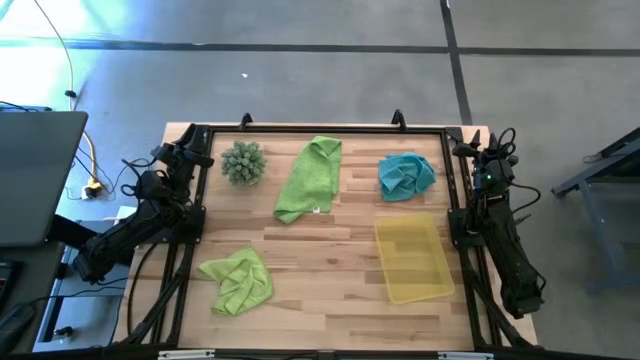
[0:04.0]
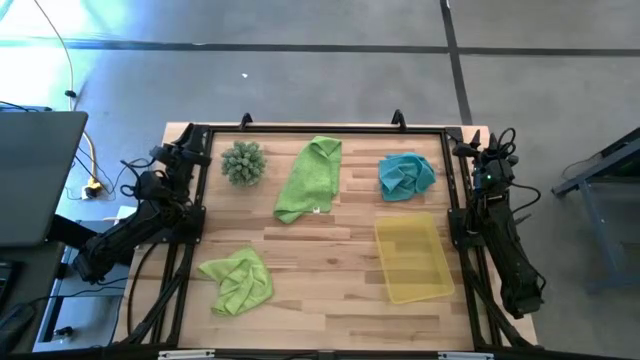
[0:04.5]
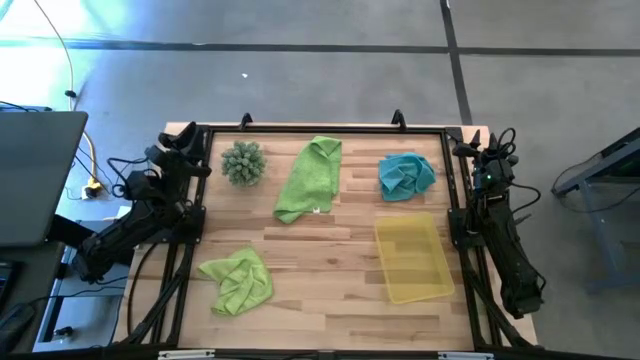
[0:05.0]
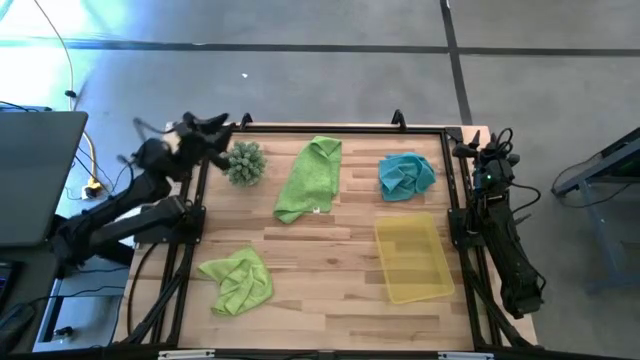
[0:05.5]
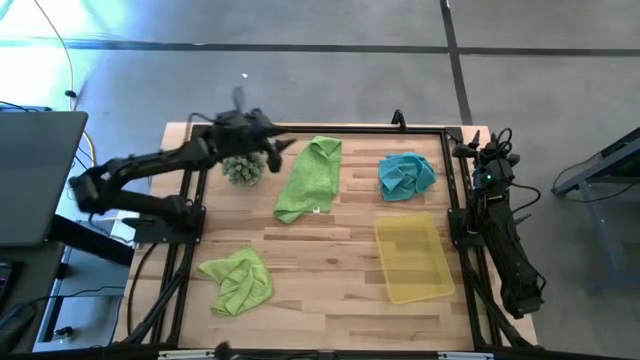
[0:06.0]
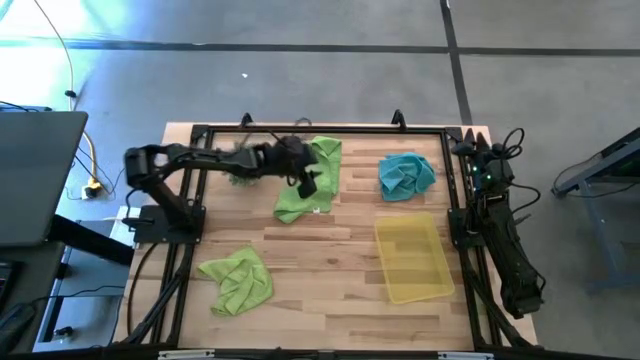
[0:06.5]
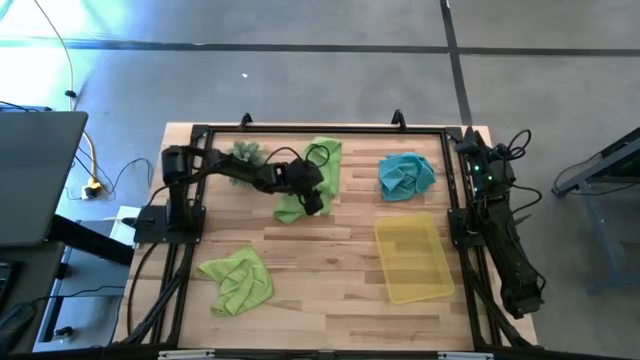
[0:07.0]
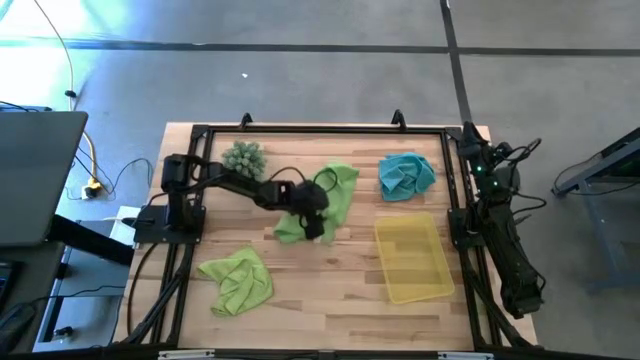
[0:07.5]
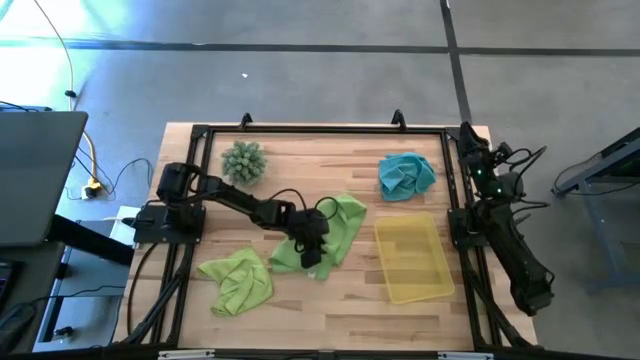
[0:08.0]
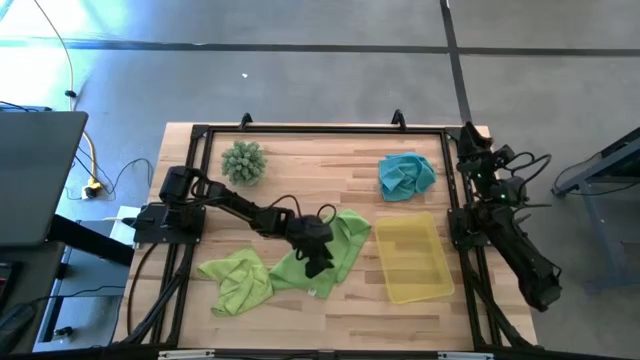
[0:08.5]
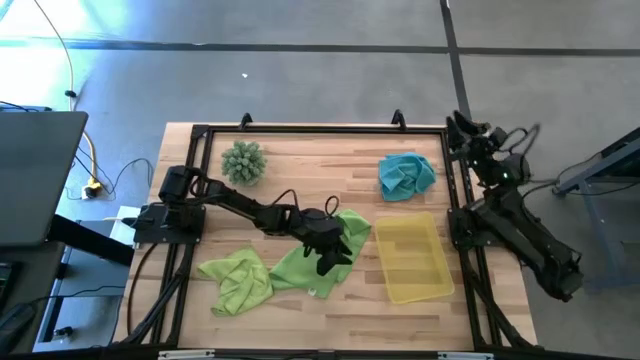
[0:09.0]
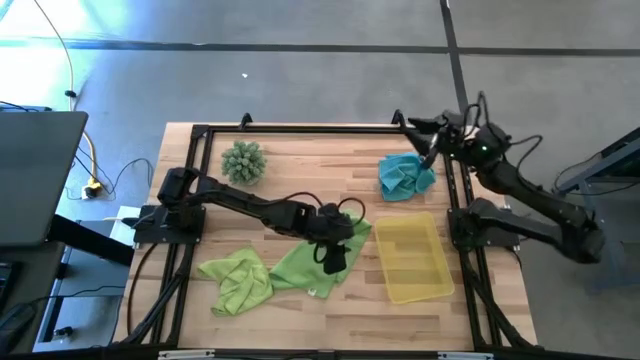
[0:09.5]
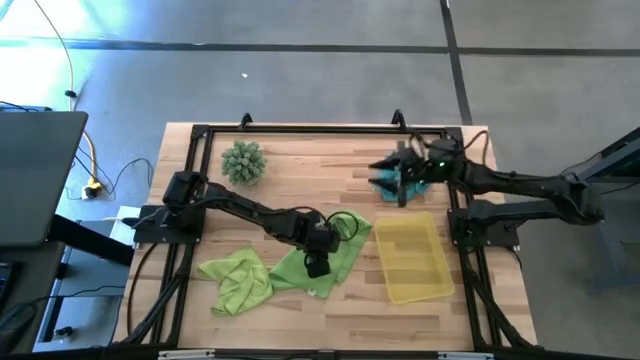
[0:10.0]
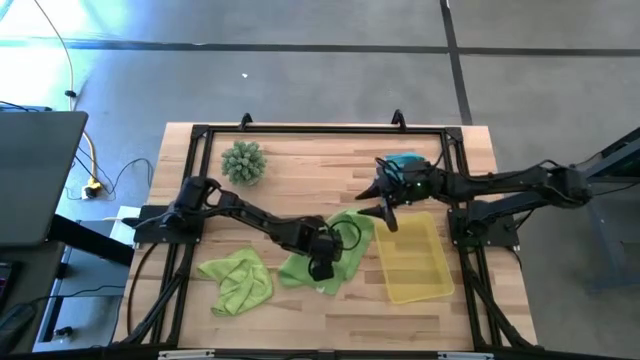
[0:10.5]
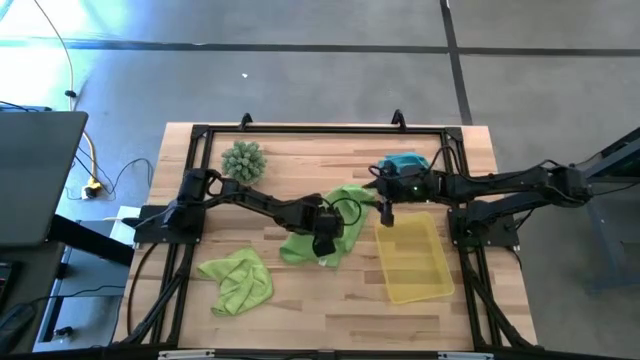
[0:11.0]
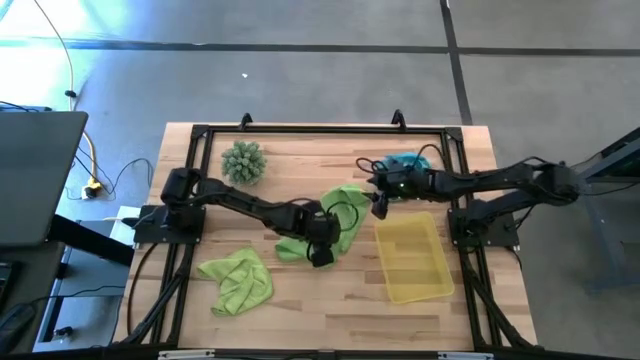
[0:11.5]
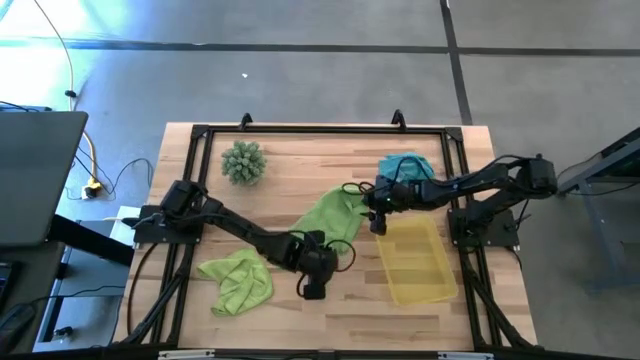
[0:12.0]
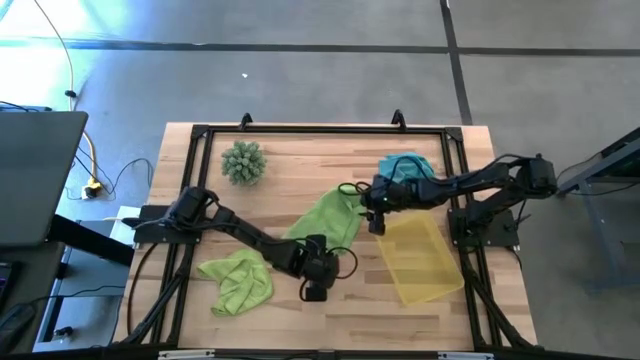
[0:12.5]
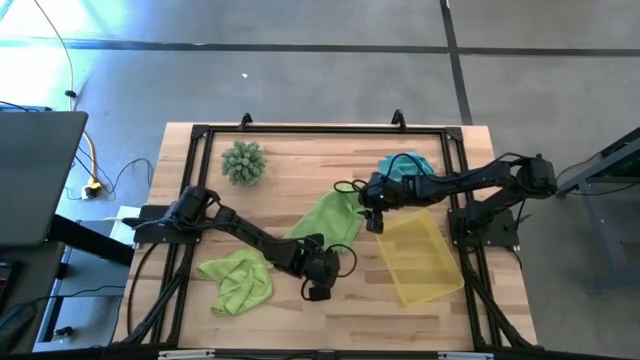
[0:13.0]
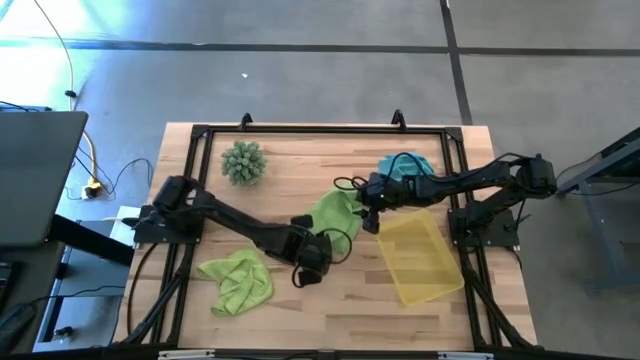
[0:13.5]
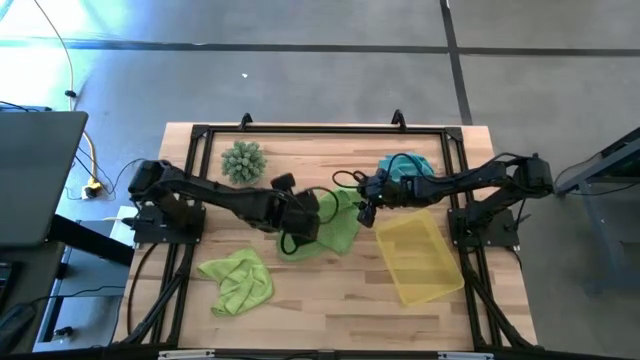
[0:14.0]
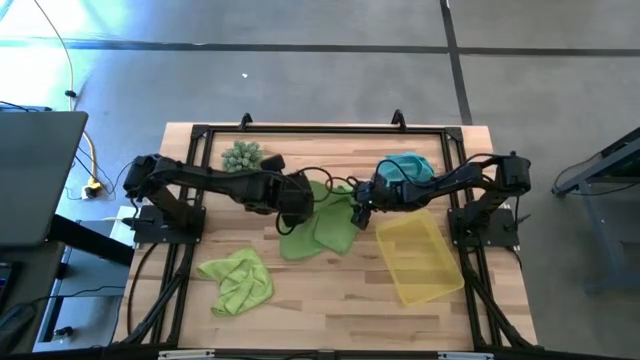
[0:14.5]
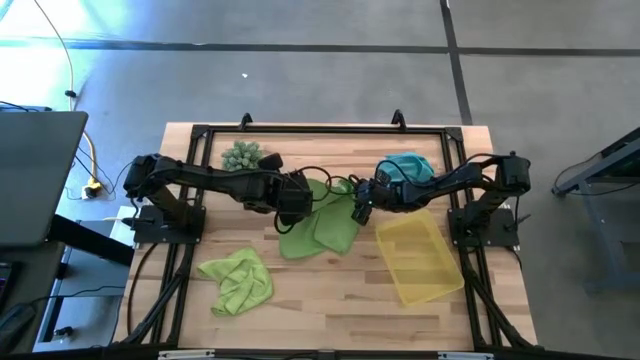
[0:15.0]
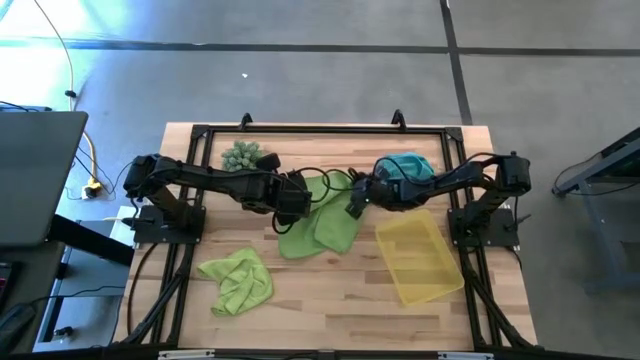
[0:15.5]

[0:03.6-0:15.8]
Task: Roll microfiber towels into tight, uniform cylinder then place into a basket
Fold the green cloth

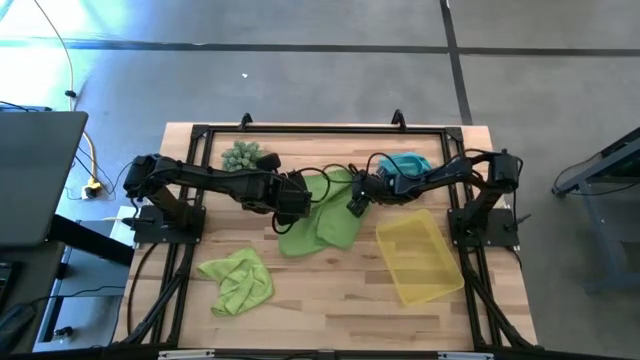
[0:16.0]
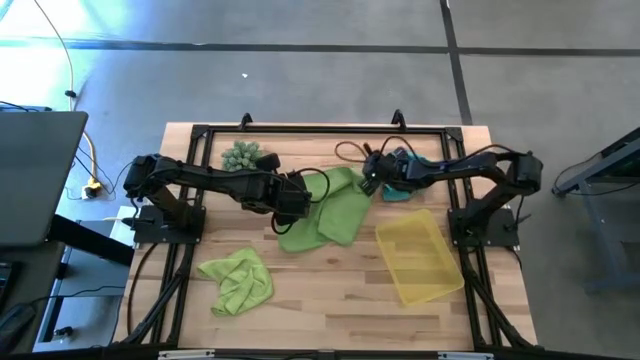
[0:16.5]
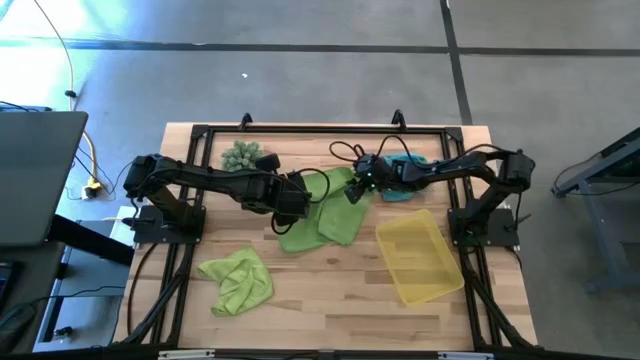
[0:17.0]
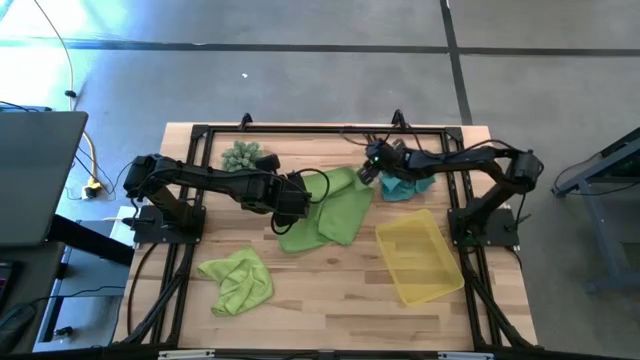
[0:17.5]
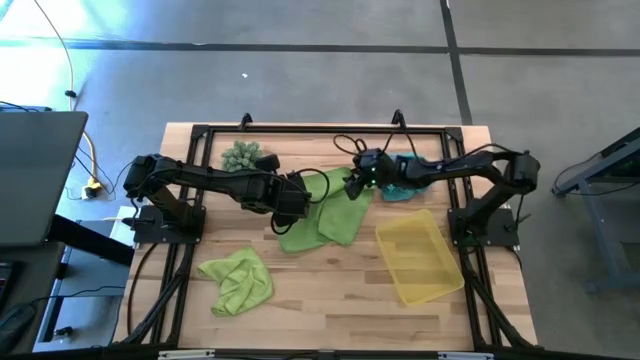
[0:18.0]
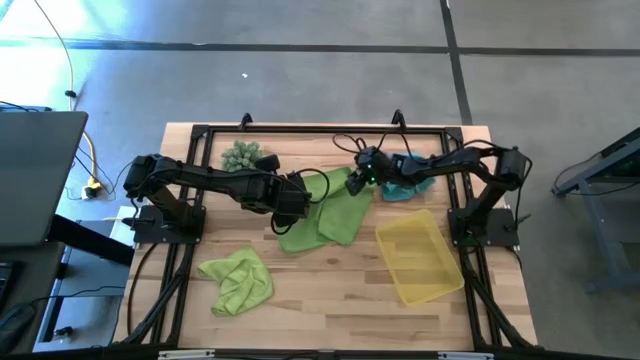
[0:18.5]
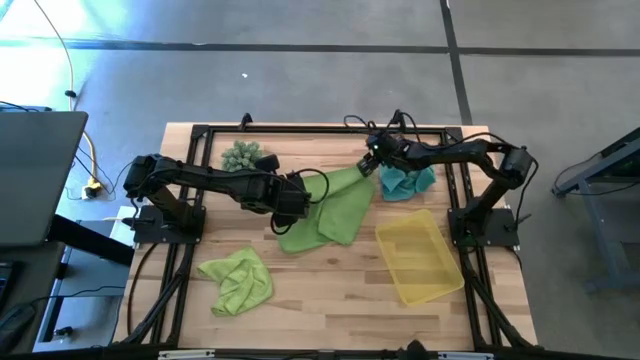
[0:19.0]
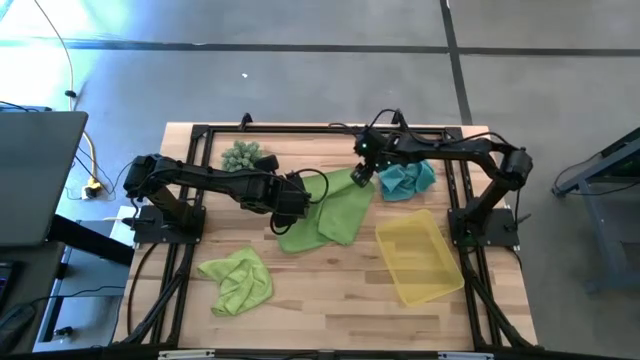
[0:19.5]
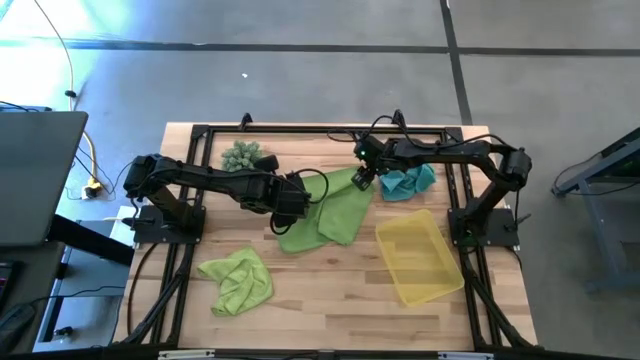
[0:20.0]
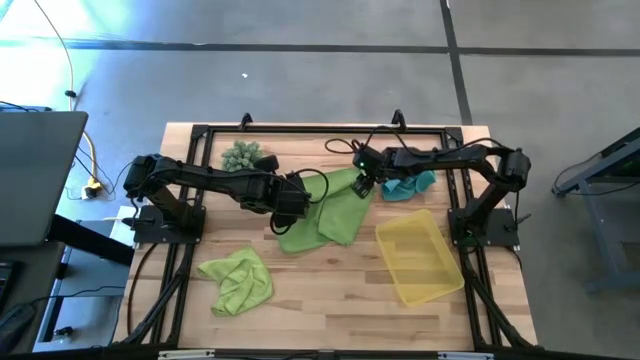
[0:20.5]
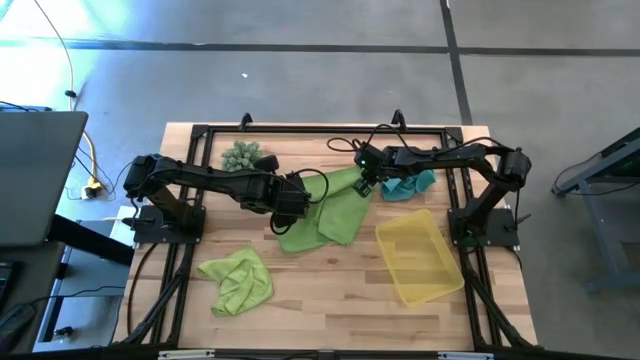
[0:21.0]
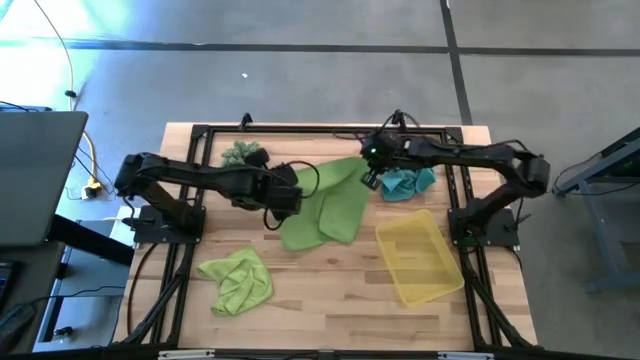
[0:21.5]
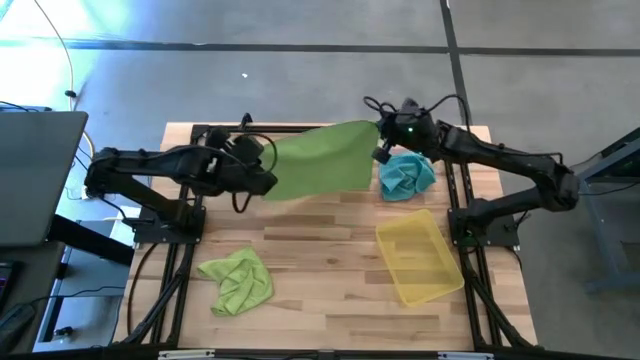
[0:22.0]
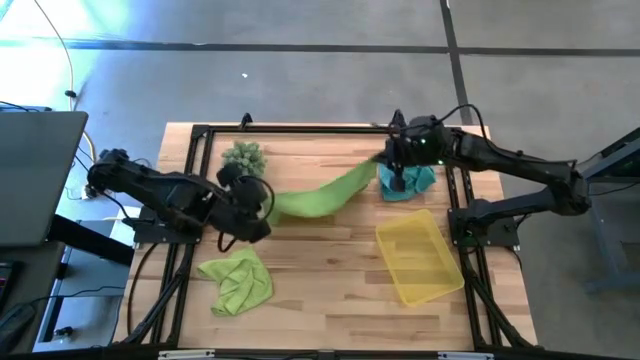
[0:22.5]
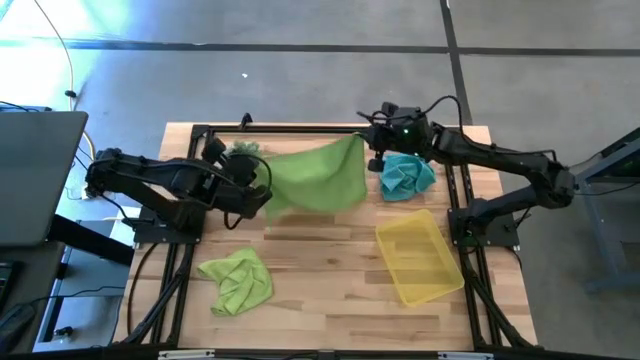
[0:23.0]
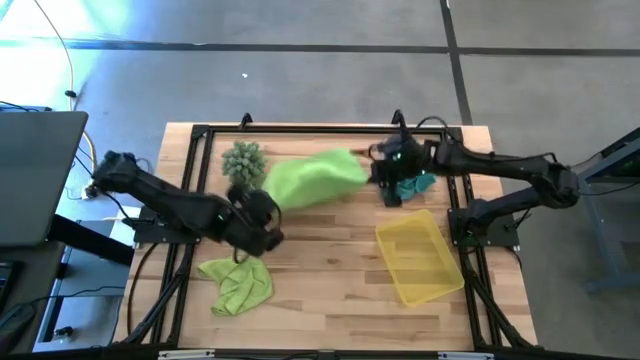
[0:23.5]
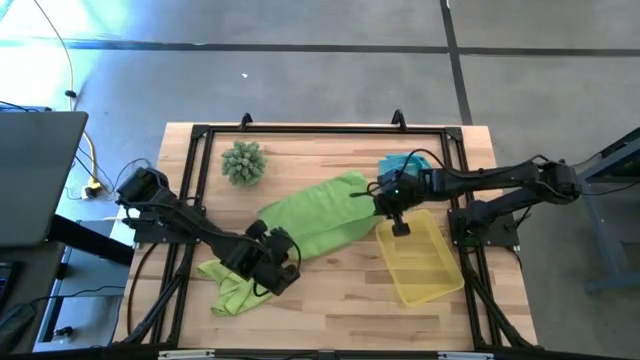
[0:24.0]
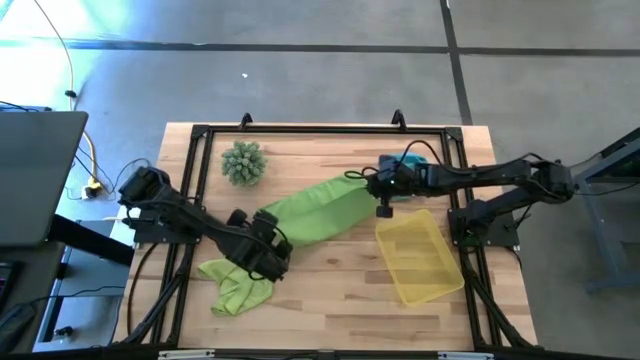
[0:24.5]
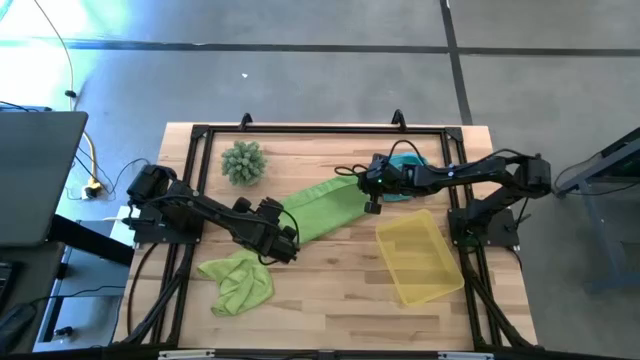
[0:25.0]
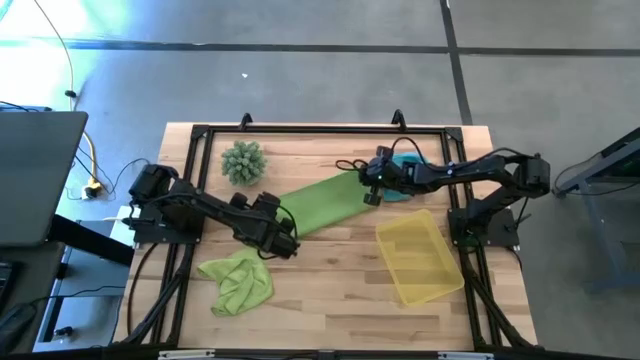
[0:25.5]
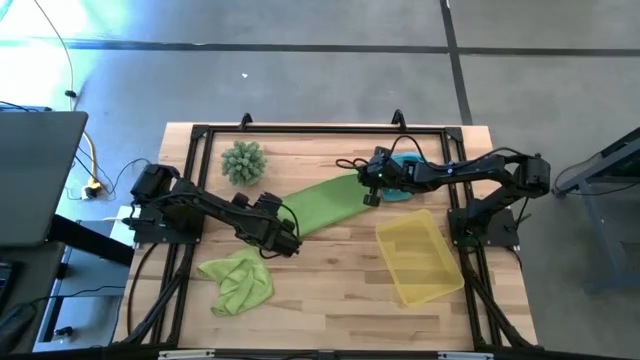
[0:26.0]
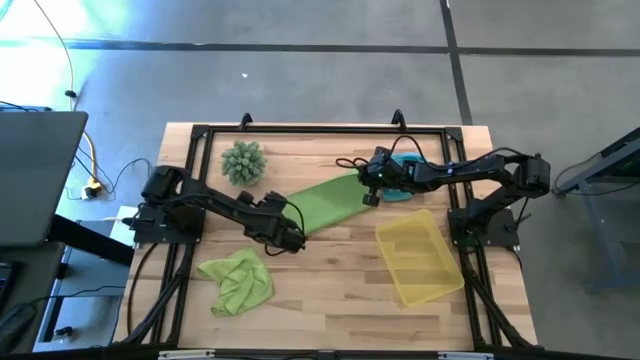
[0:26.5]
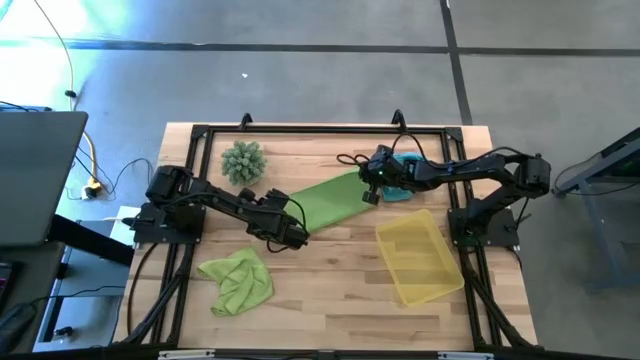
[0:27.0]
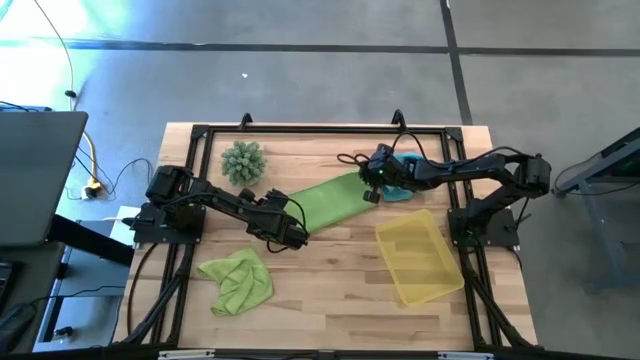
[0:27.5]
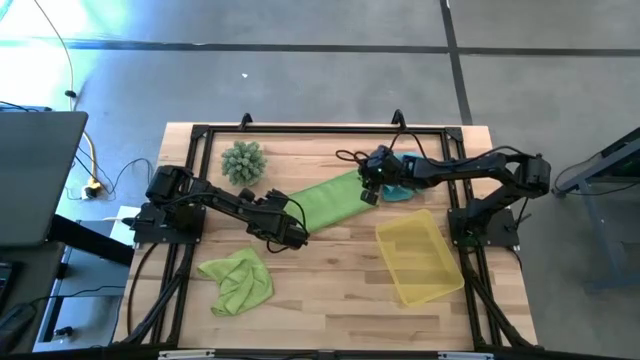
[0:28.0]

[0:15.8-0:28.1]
Fold the green cloth
